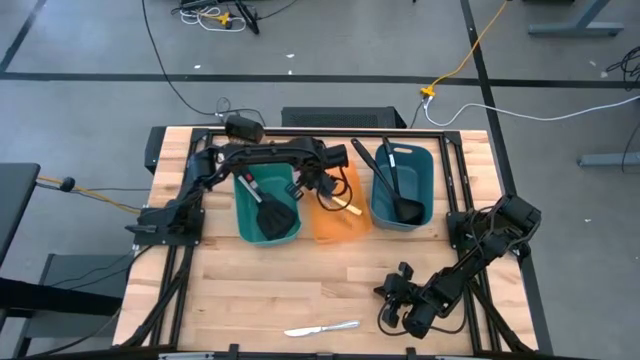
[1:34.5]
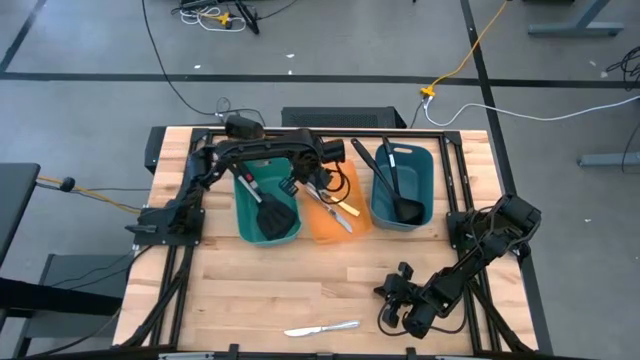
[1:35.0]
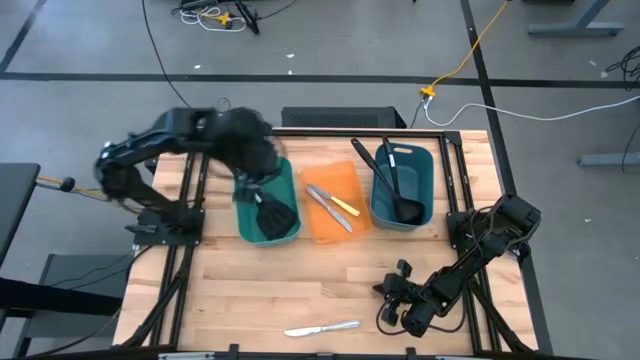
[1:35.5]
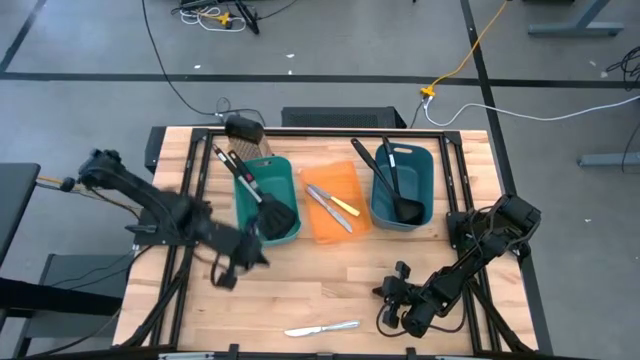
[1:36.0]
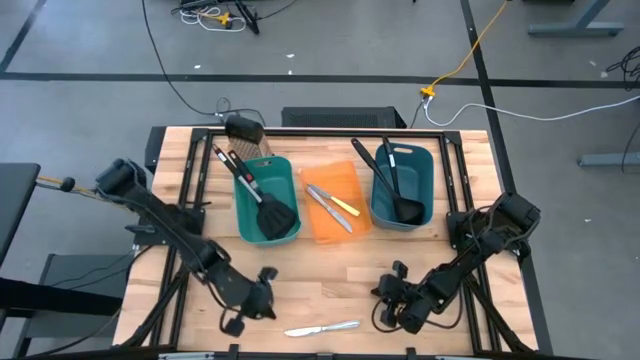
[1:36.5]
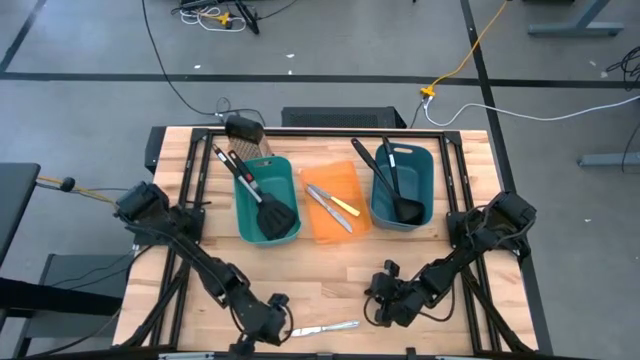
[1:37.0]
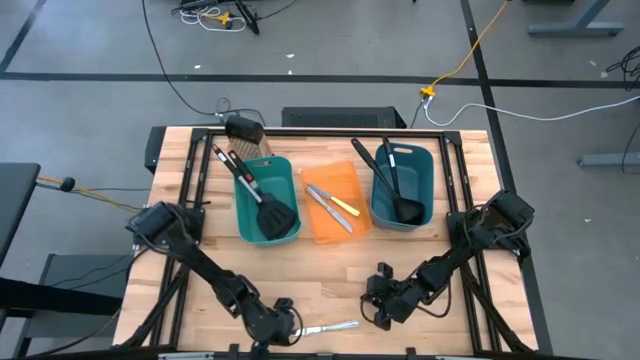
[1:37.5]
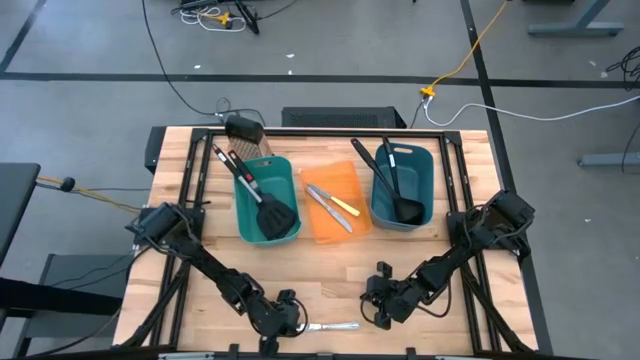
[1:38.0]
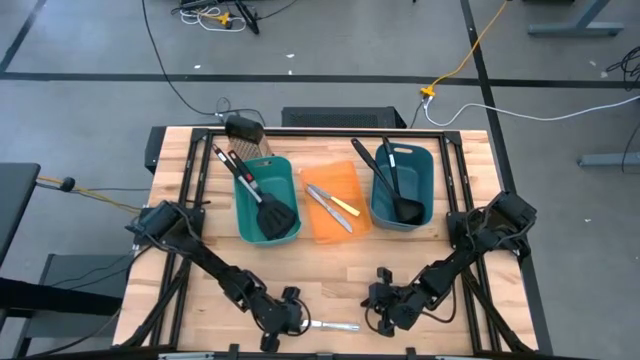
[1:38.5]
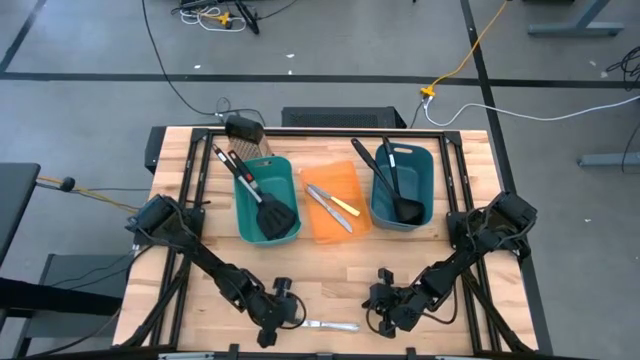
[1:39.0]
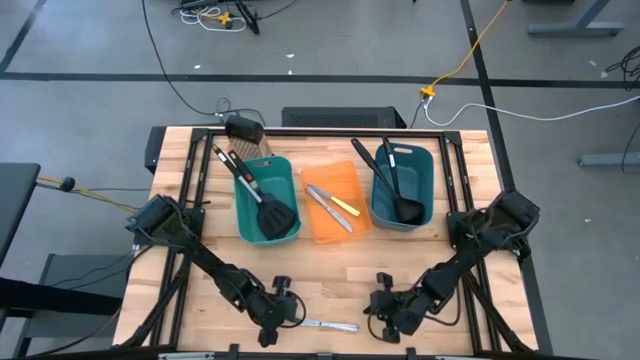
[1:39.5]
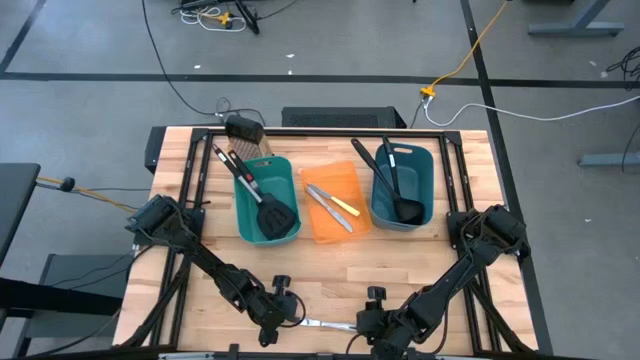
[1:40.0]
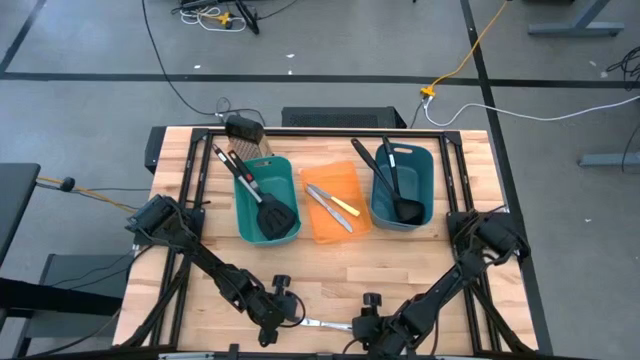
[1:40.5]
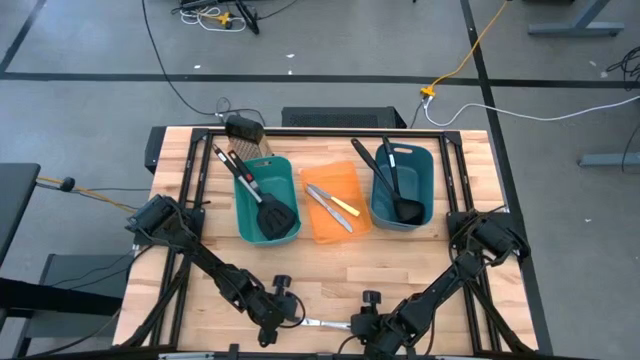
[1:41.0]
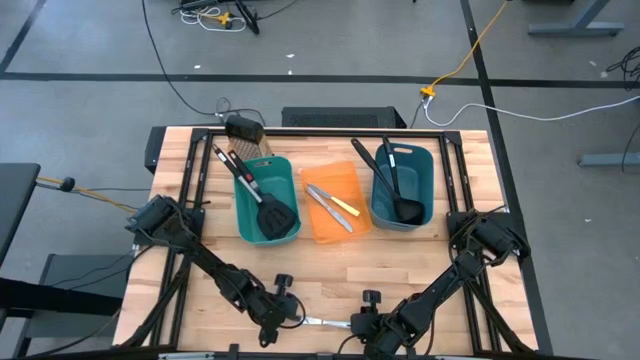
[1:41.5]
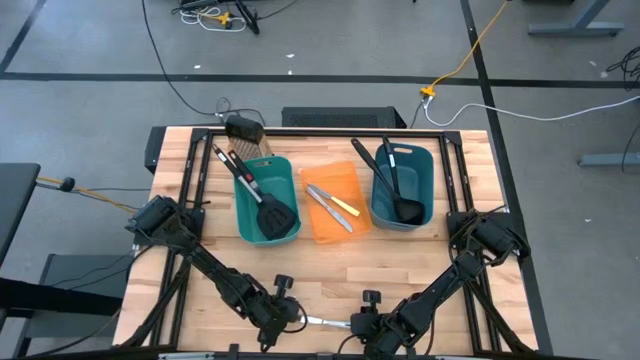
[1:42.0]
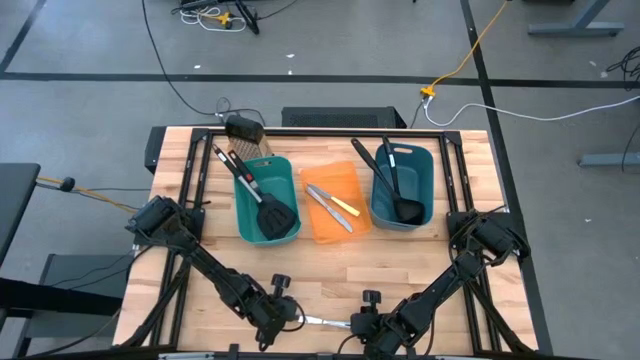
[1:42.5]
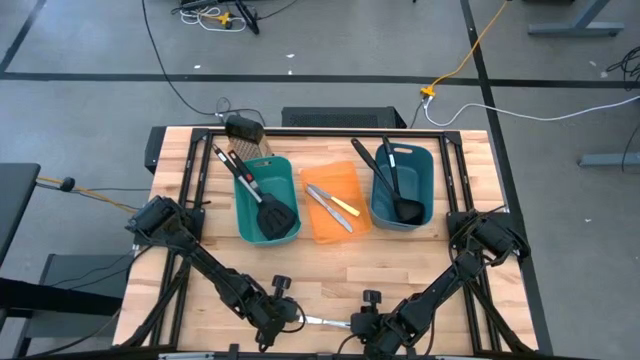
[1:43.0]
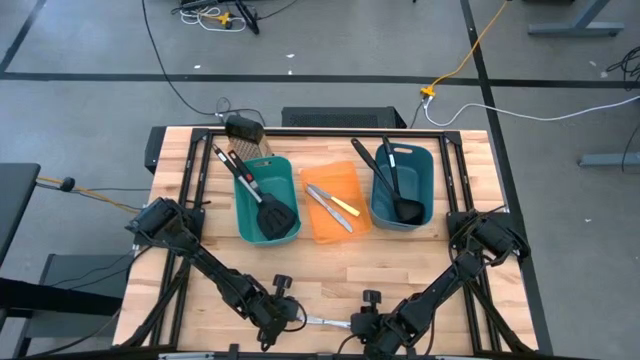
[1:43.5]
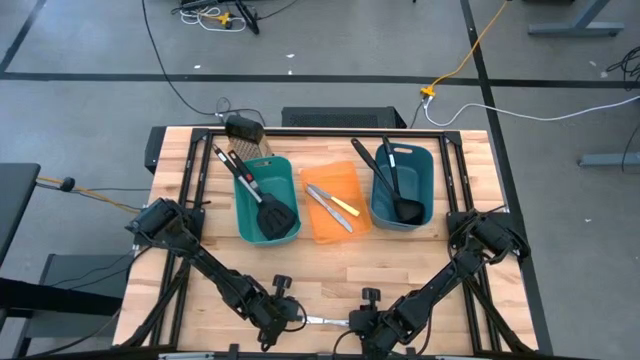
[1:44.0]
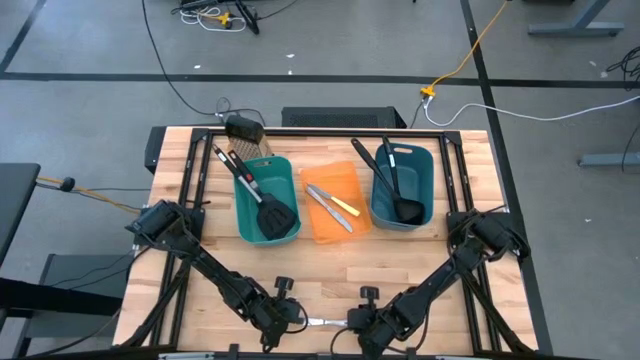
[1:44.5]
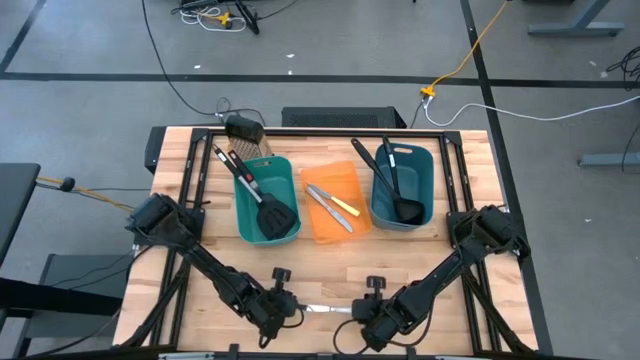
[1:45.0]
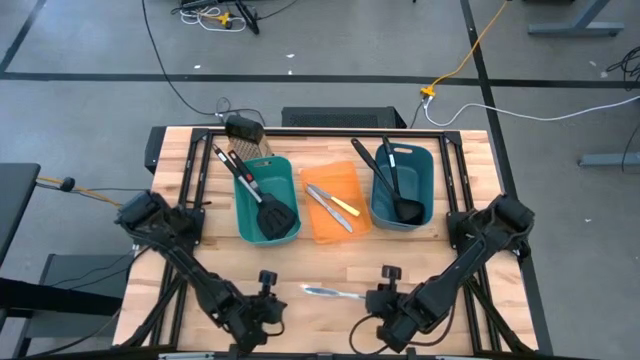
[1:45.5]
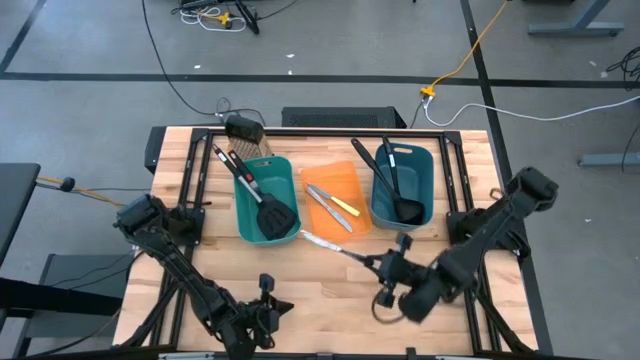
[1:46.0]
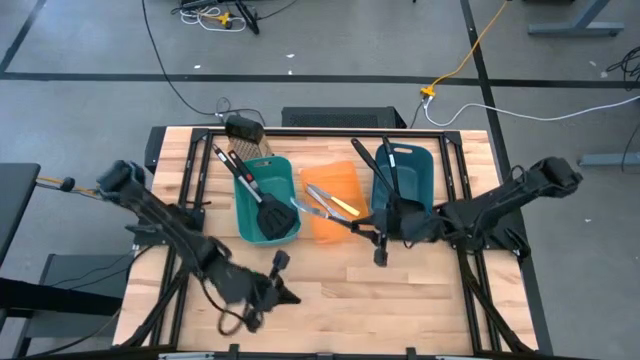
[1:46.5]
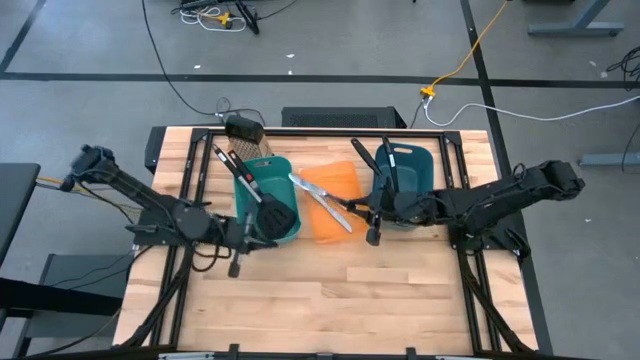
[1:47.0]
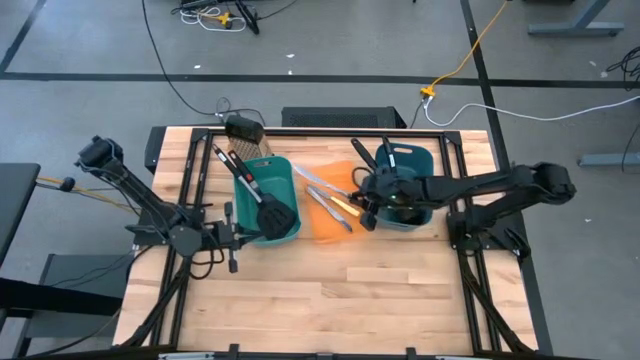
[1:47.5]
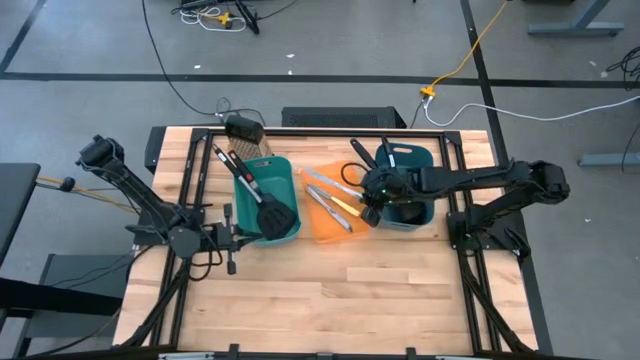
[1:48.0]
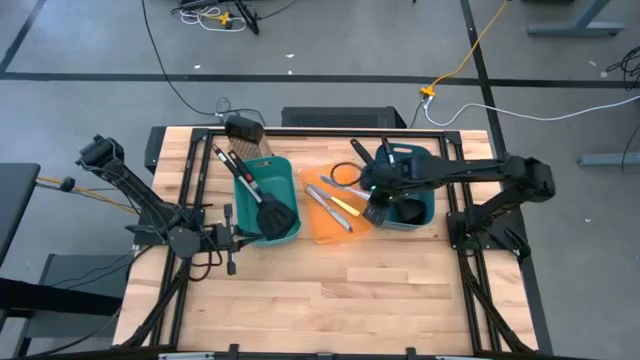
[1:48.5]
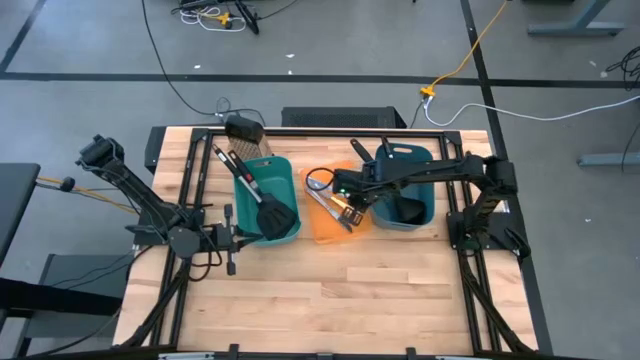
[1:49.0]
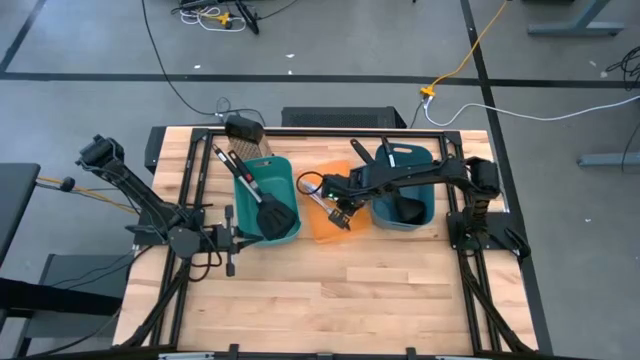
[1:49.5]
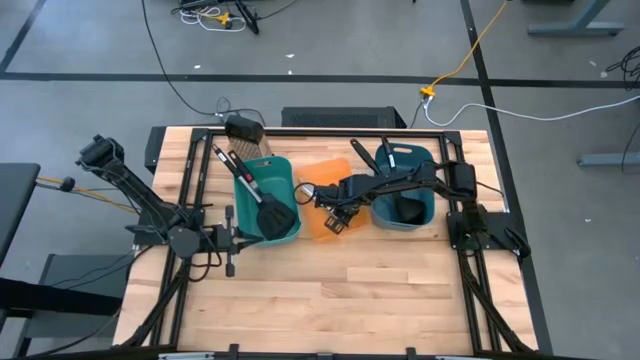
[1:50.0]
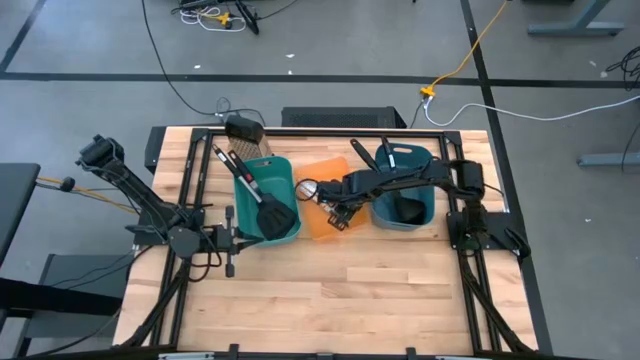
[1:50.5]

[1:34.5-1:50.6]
Task: Pick & Place Kitchen Items
Put the silver table knife into the orange bin

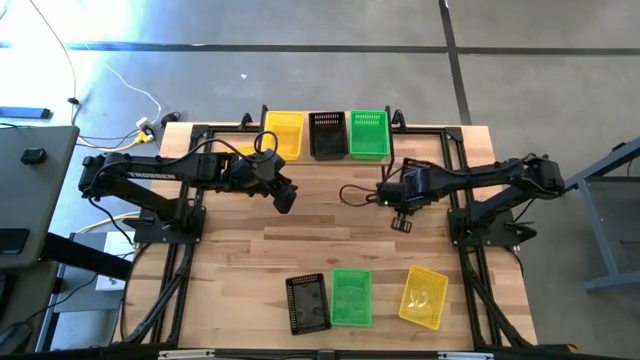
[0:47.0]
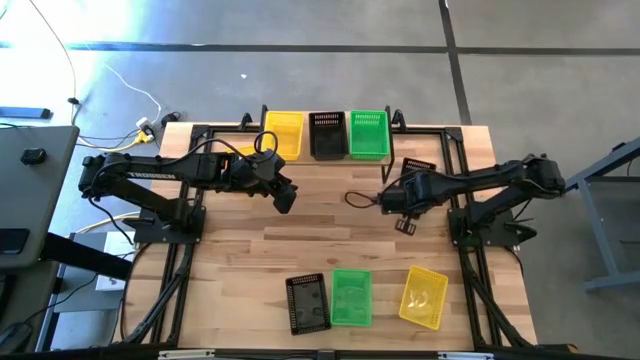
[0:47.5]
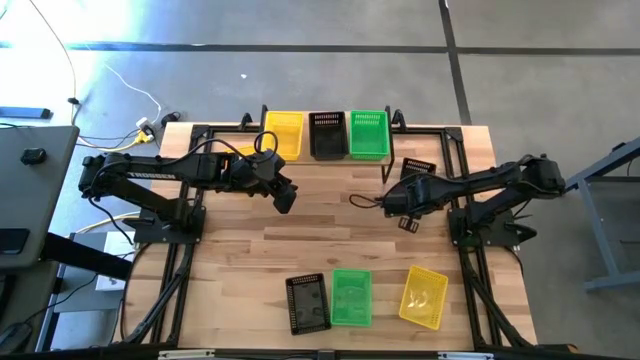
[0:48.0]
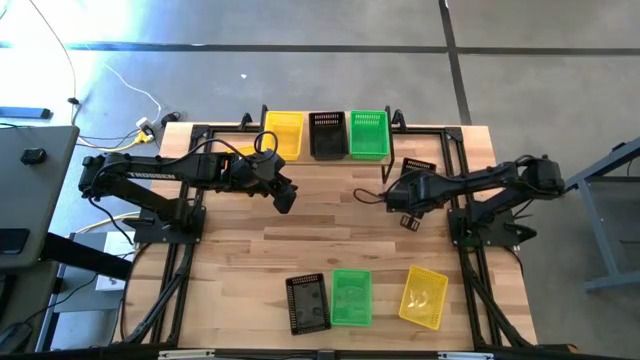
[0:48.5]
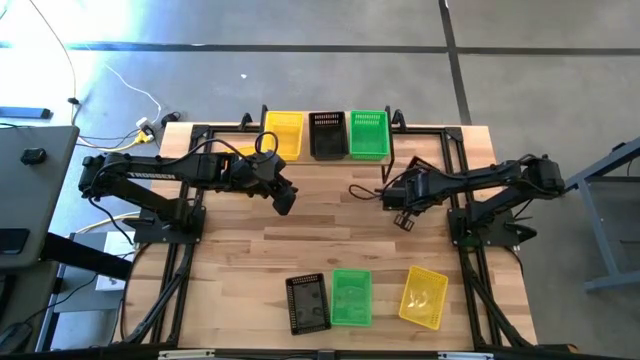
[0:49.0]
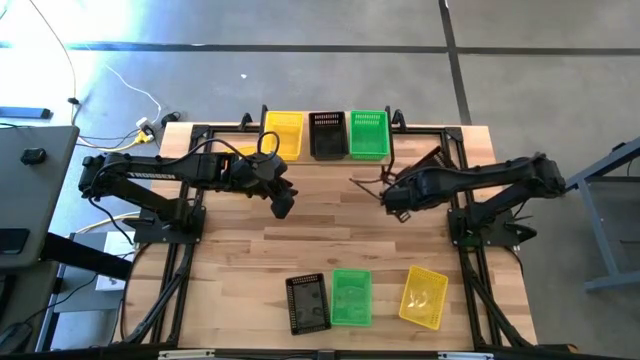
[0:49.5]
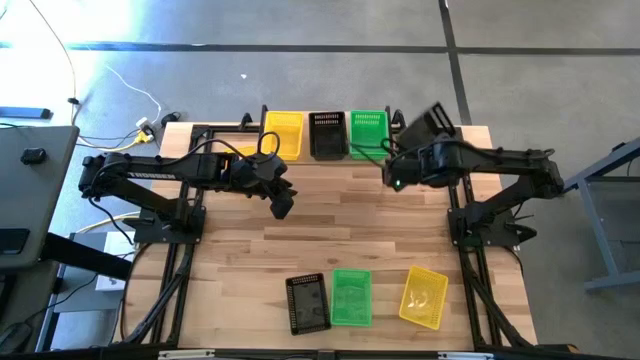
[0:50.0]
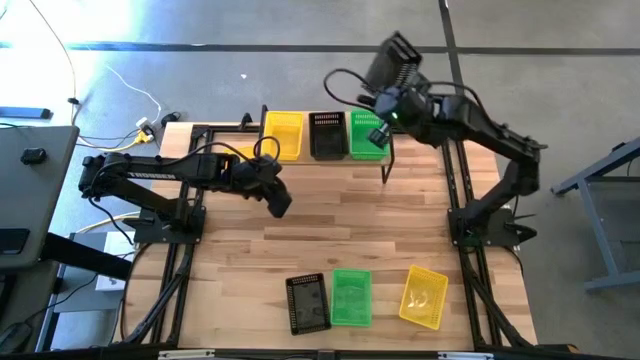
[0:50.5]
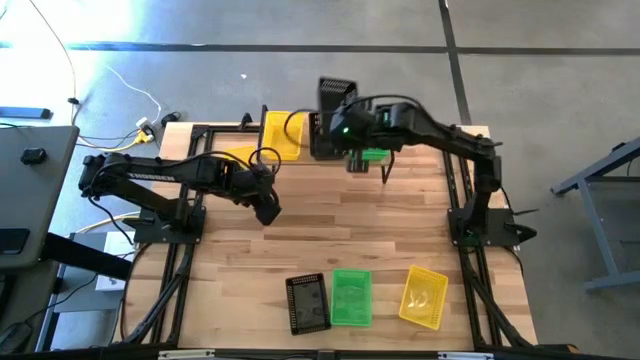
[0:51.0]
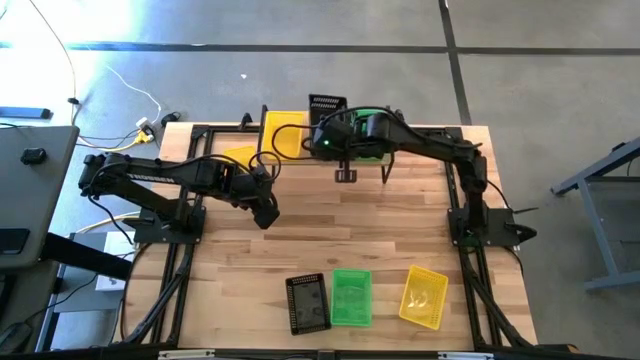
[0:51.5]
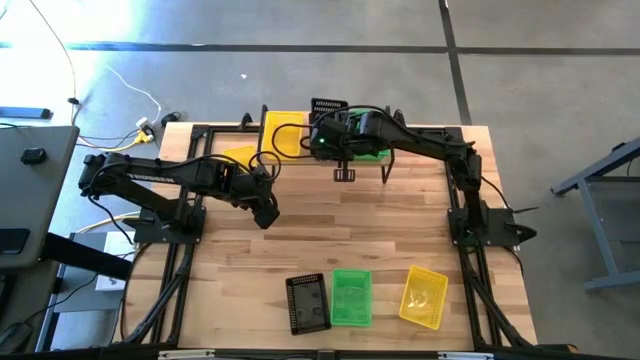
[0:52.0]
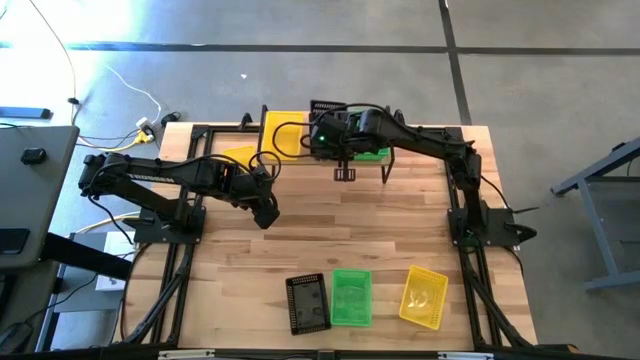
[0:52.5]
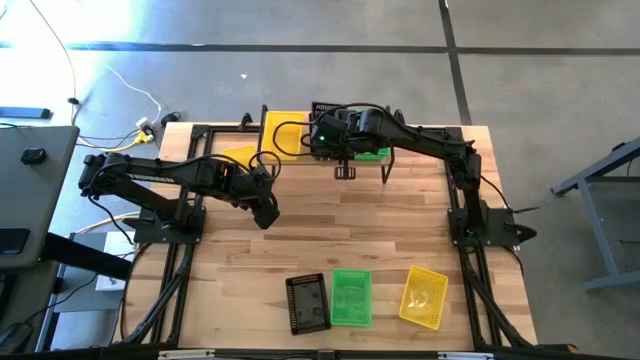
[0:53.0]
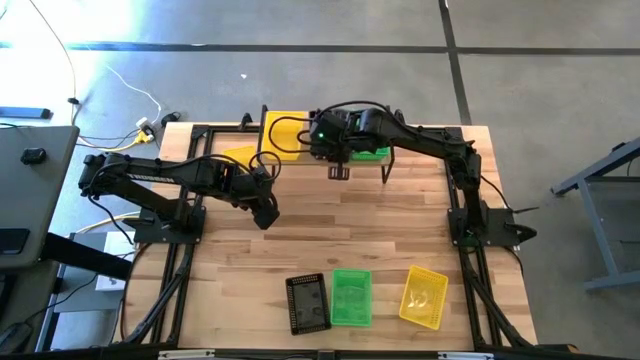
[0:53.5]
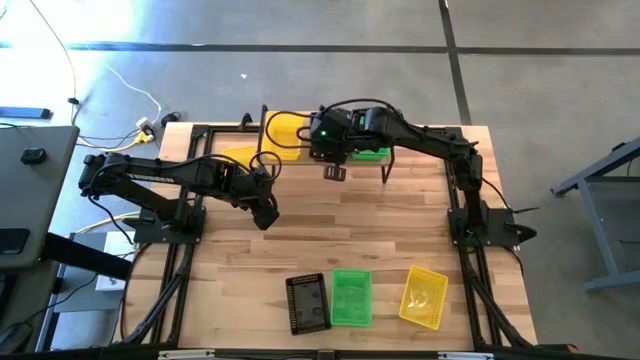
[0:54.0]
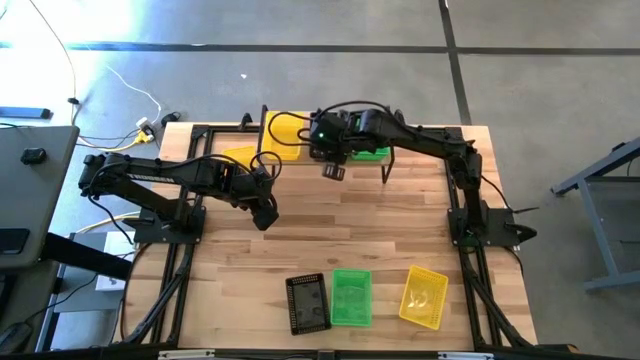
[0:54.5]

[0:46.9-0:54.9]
Task: Stack baskets on shelf by color
Stack the top right black bin on the other black bin on the shelf
